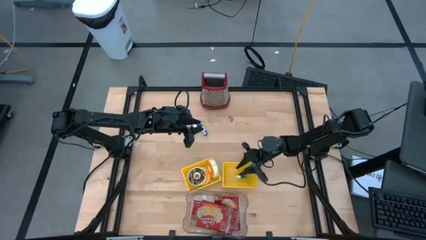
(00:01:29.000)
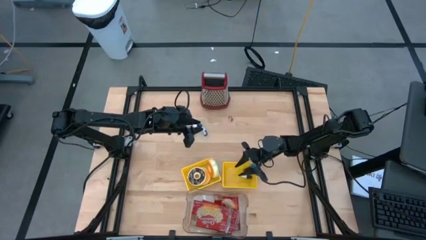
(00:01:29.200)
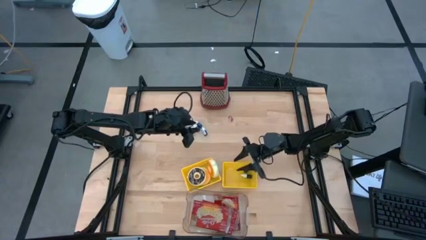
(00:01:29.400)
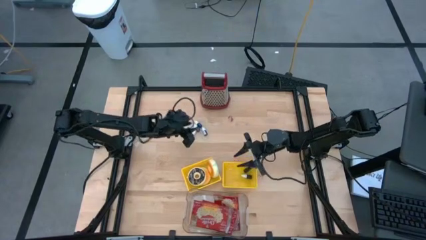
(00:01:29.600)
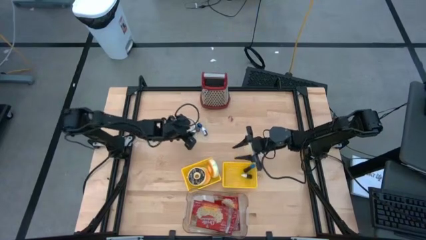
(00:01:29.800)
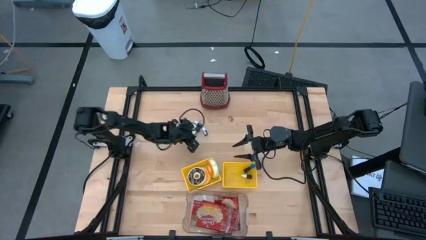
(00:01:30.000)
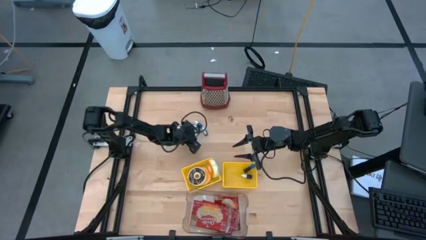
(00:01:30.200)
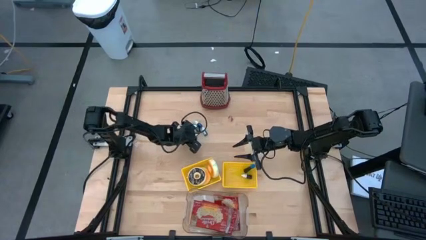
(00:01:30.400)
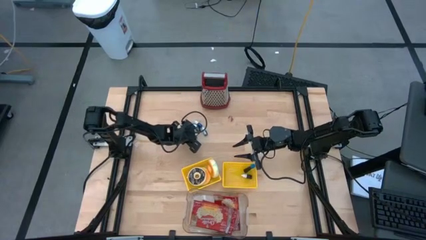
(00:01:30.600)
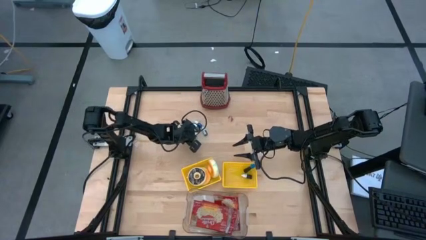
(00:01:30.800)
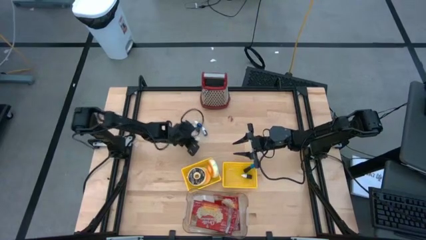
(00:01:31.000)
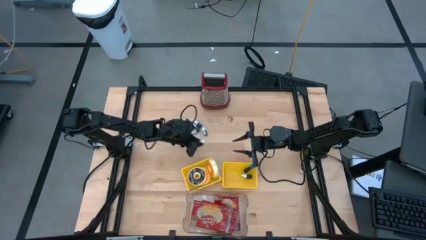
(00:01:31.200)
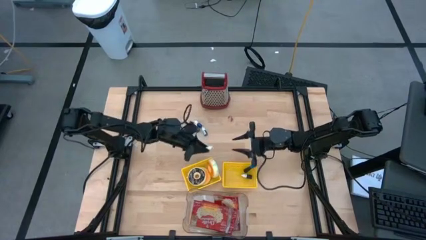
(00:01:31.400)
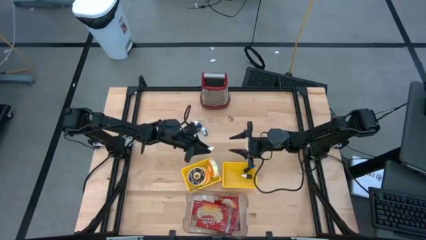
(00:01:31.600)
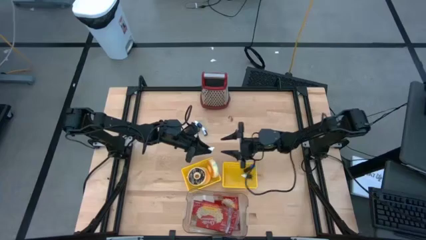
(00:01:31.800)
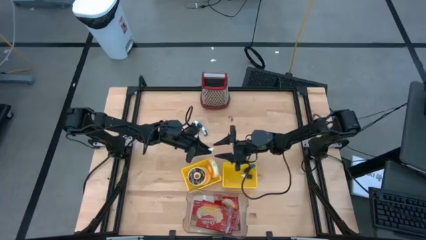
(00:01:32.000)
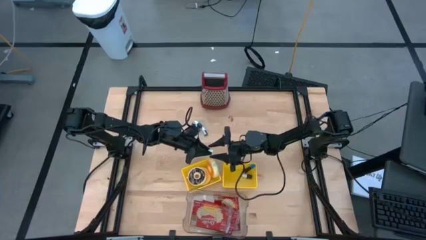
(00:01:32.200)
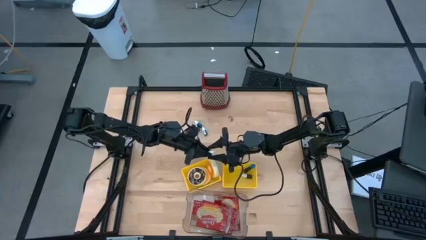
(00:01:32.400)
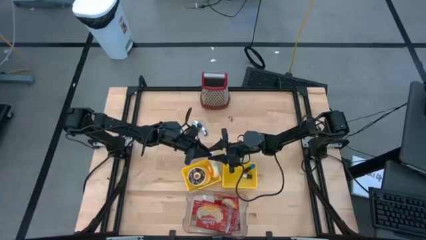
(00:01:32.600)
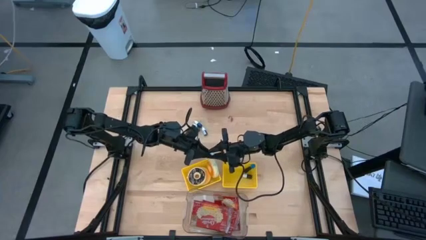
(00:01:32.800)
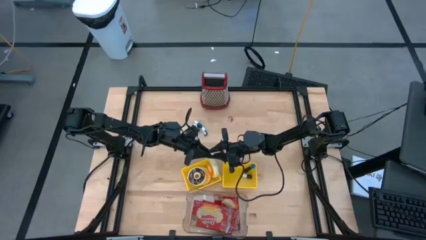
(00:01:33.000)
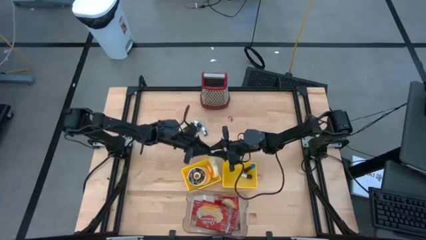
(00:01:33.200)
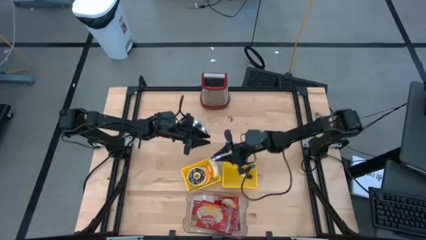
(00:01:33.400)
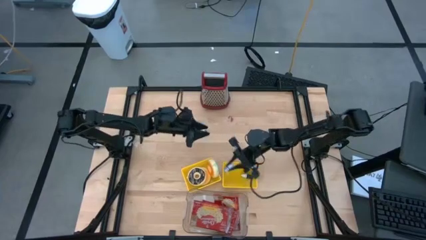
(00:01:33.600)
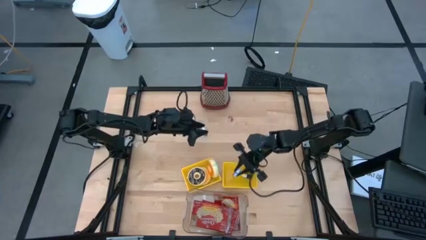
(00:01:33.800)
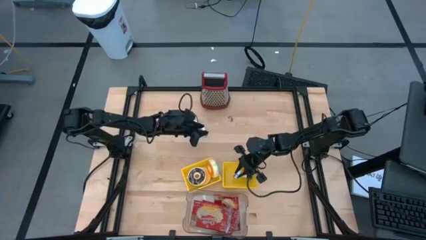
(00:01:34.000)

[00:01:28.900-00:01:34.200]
Put the purple food coloring bottle into the right yellow bin

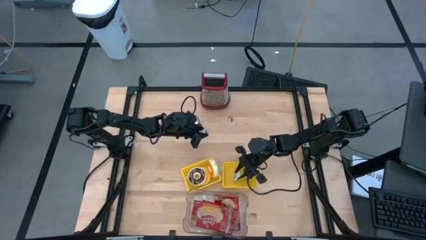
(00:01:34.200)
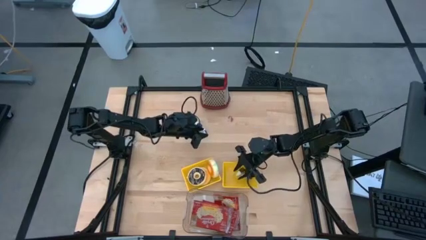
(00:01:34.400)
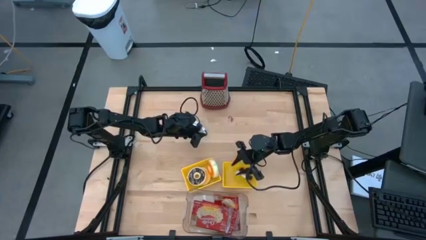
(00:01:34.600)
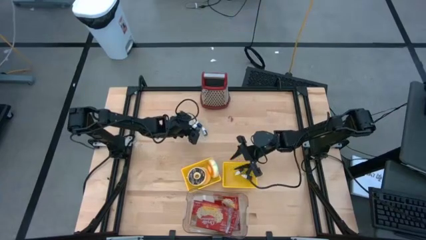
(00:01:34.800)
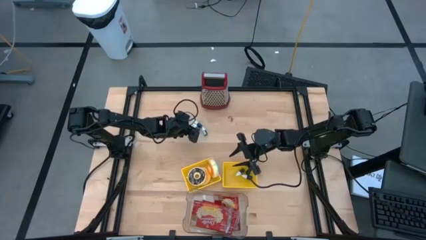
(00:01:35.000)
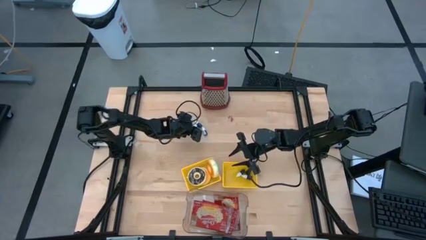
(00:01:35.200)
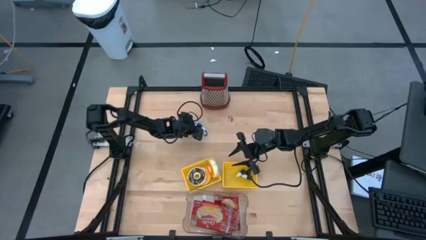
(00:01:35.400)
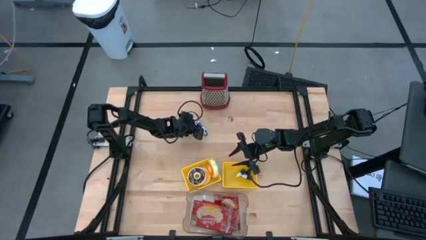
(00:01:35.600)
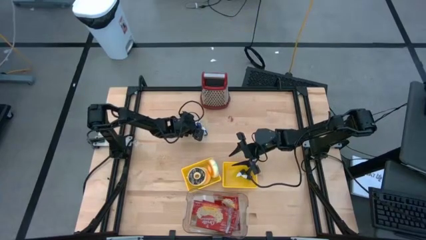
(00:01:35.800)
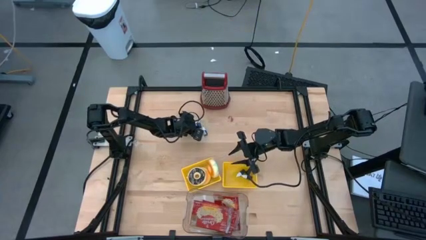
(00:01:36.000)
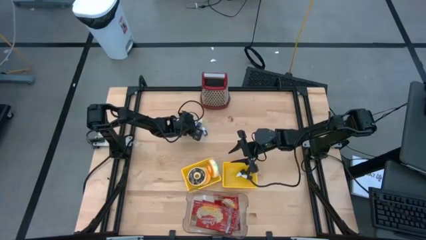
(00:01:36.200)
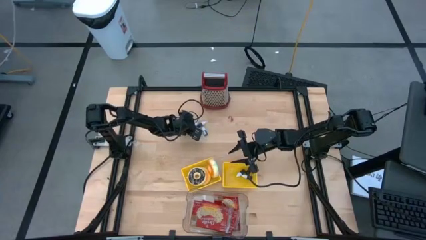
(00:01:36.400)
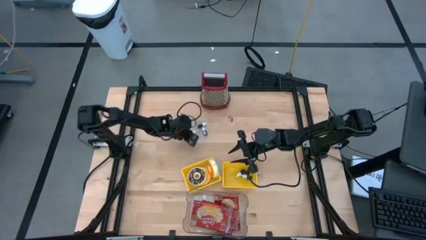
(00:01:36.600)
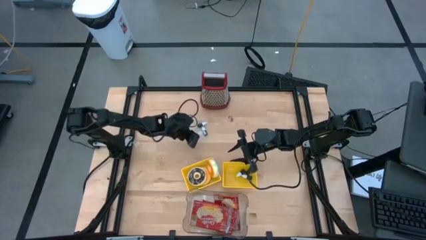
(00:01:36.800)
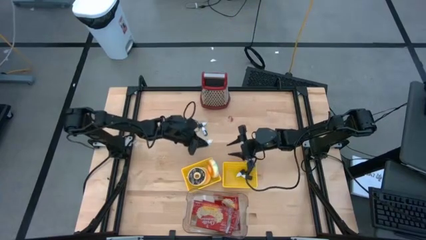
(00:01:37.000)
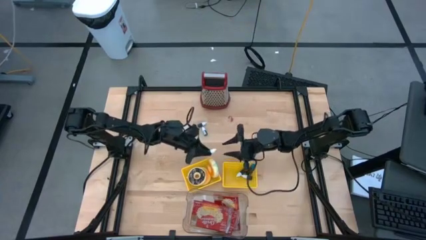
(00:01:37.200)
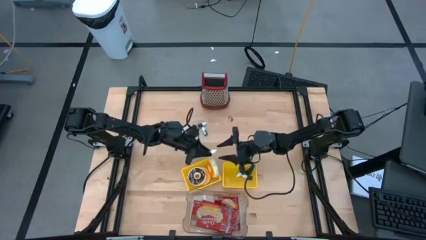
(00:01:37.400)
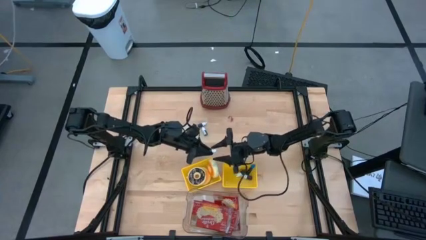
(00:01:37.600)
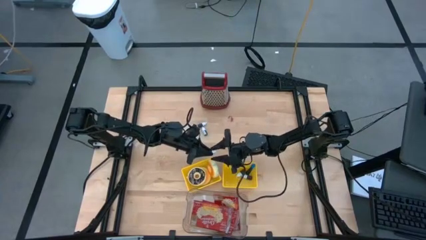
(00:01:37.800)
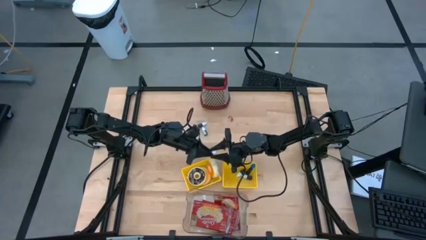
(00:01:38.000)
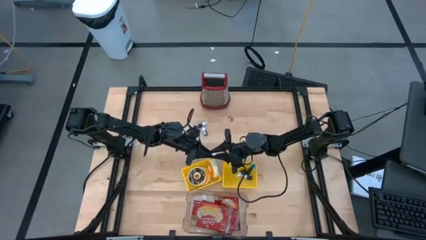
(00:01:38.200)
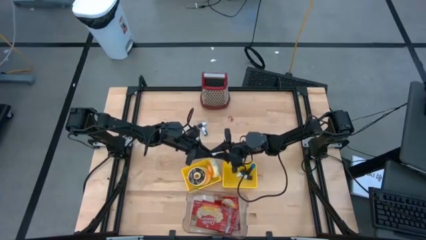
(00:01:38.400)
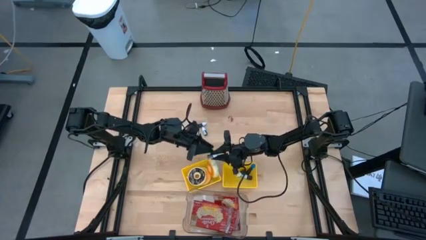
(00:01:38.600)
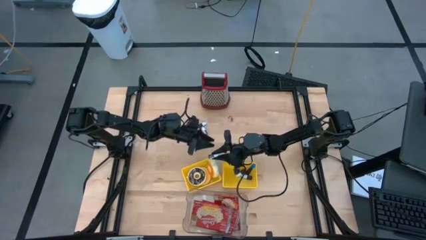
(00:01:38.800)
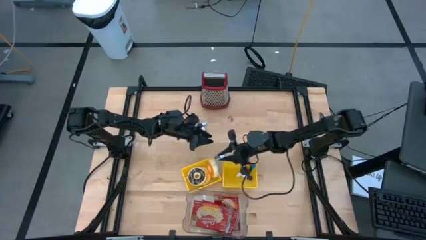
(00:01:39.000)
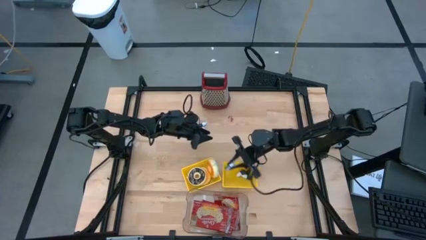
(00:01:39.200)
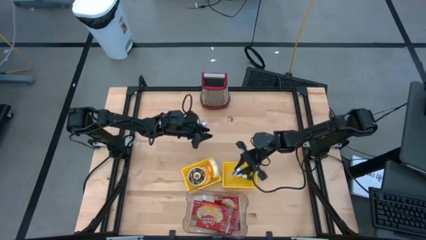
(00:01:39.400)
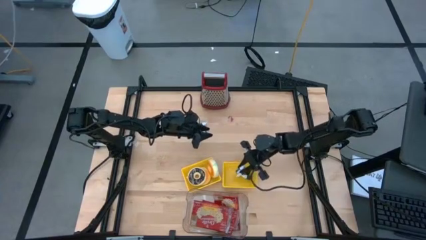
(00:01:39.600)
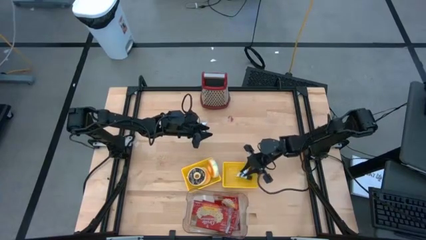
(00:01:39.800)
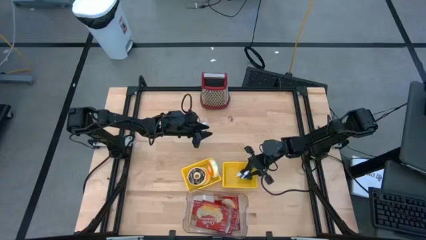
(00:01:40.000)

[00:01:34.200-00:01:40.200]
Put the dark green food coloring bottle into the right yellow bin

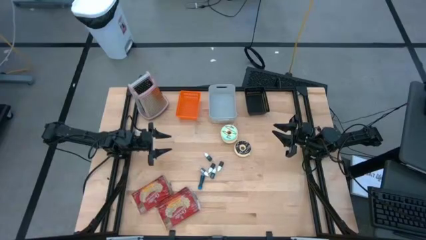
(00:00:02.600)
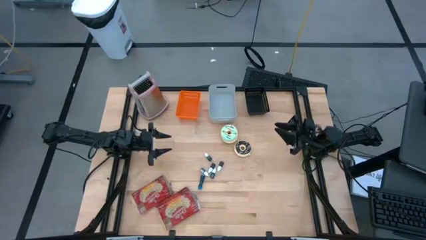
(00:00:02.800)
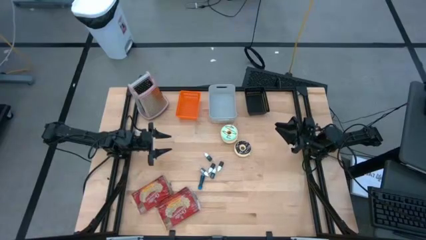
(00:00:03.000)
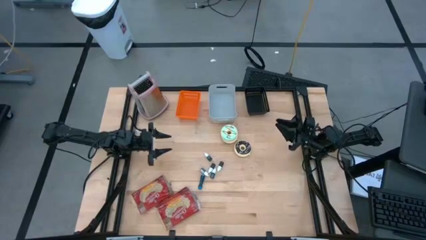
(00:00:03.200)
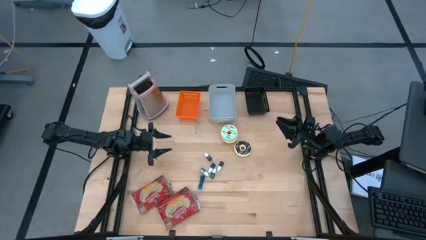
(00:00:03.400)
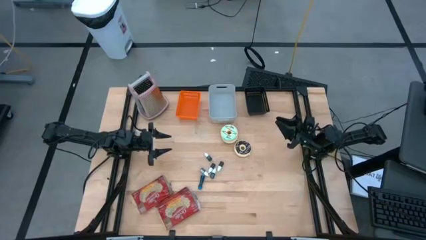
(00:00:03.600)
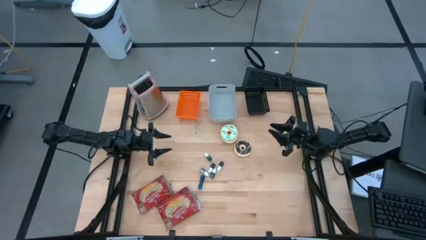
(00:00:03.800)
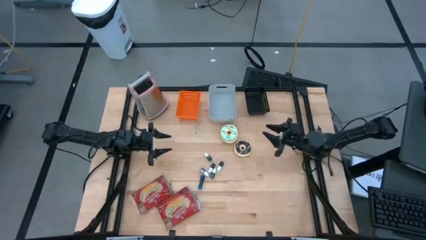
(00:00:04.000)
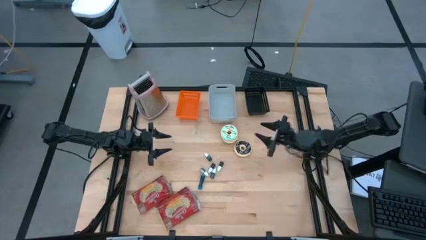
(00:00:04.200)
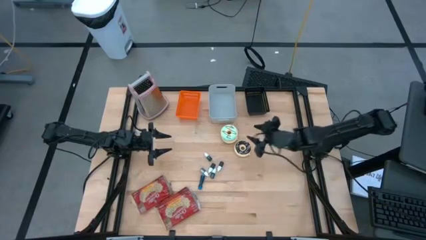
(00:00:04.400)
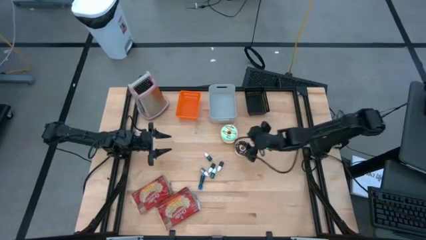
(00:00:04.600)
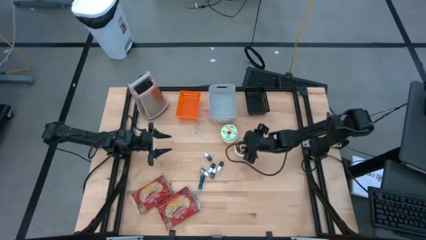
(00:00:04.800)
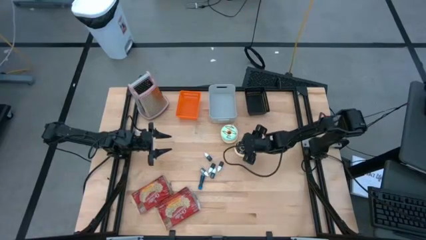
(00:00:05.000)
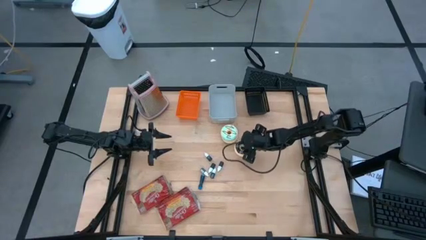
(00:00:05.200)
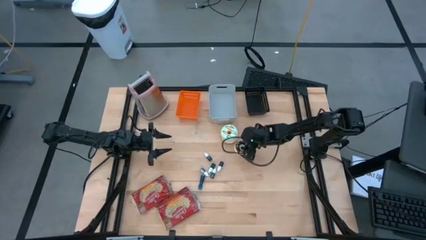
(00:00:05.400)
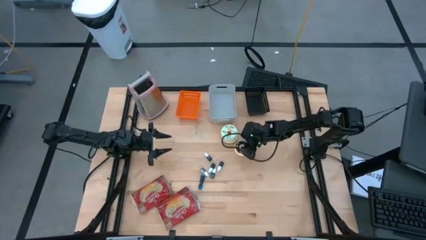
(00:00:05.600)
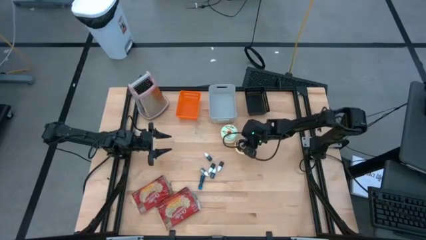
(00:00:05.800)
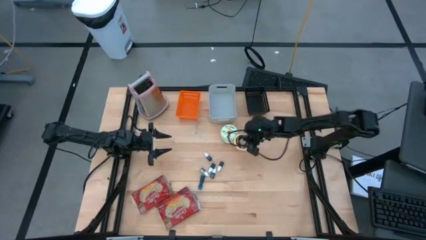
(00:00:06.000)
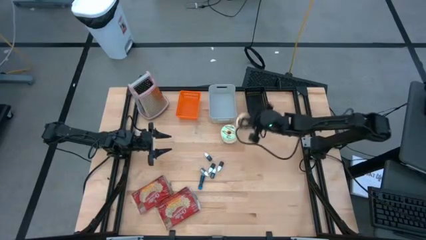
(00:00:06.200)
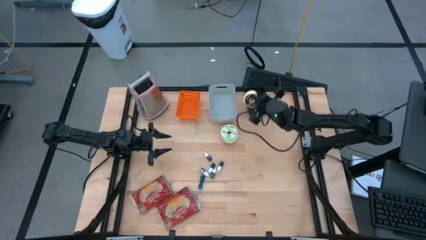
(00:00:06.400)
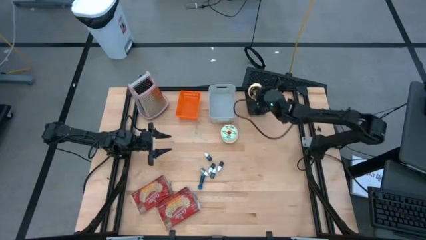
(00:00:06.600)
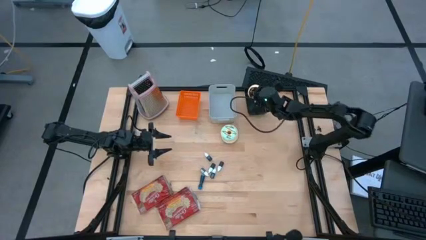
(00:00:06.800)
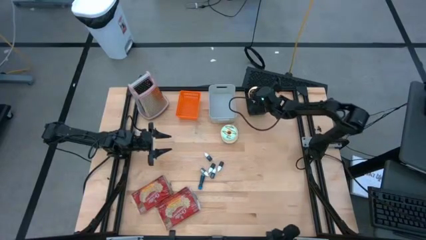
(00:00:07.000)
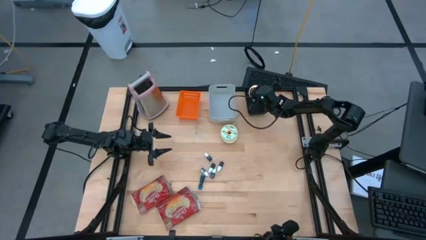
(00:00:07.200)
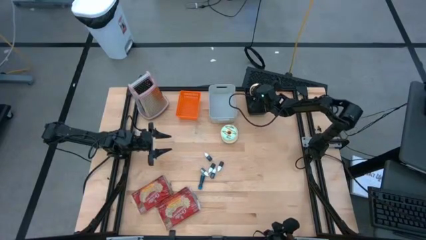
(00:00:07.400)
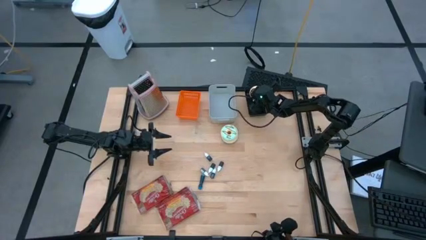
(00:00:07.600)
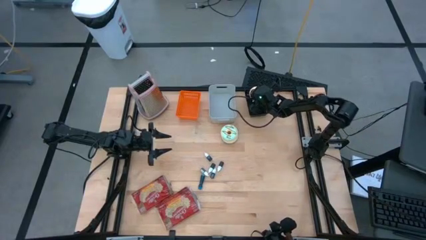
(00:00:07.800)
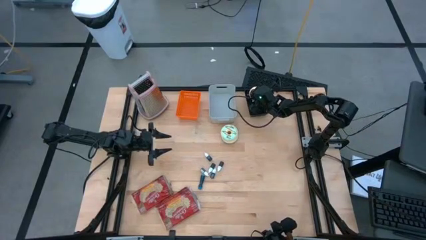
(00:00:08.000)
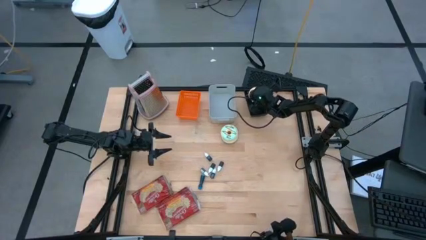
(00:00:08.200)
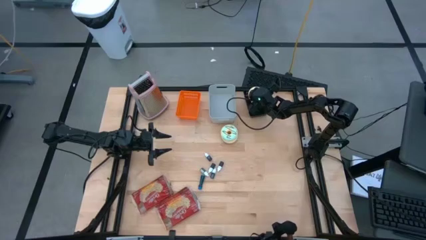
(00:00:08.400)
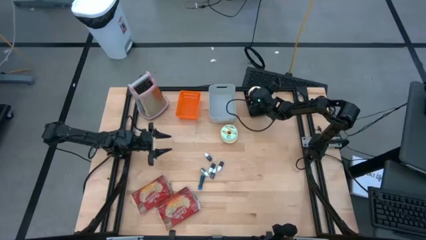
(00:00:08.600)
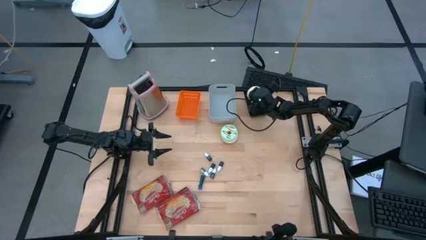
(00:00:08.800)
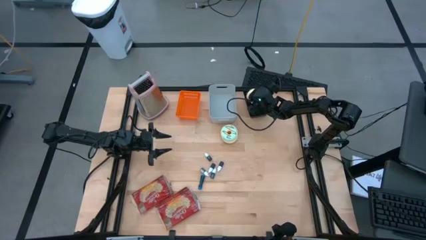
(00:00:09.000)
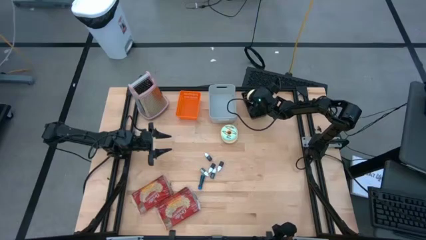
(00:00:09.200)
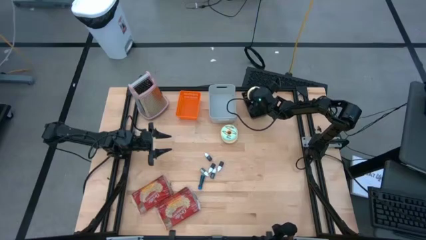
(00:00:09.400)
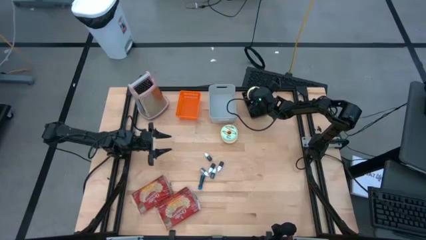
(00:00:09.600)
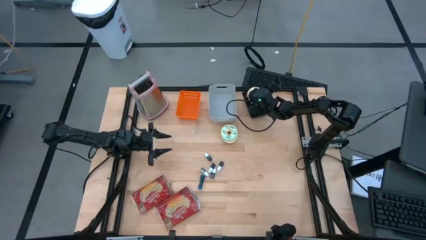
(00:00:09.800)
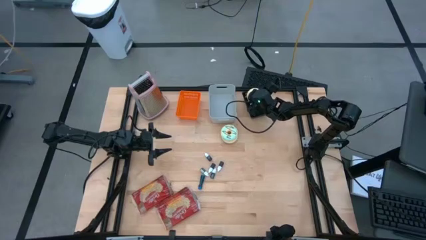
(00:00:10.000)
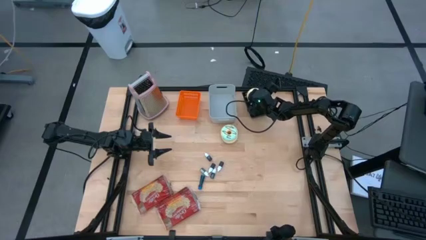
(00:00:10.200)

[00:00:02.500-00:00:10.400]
Put the brown doughnut into the black bin
